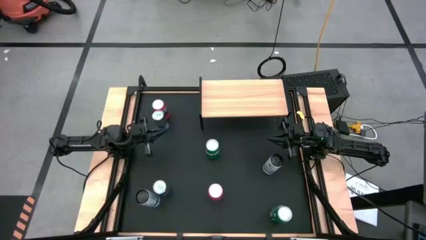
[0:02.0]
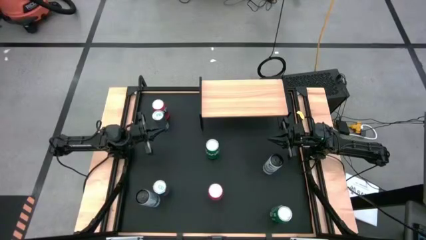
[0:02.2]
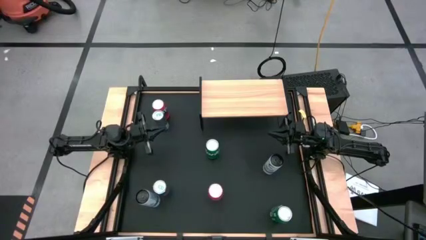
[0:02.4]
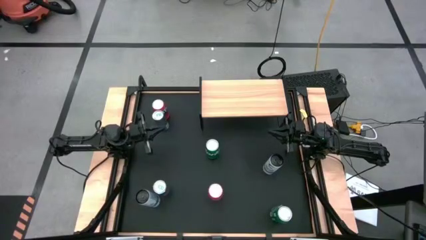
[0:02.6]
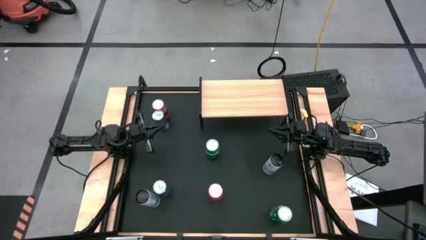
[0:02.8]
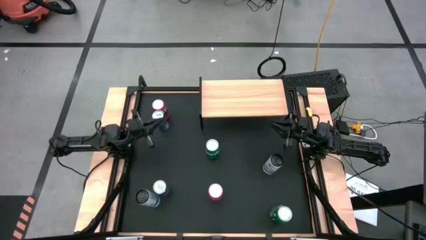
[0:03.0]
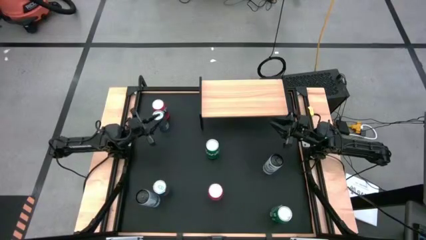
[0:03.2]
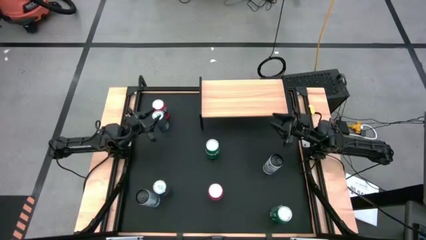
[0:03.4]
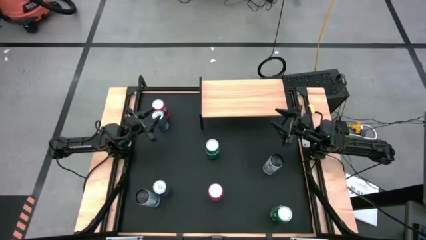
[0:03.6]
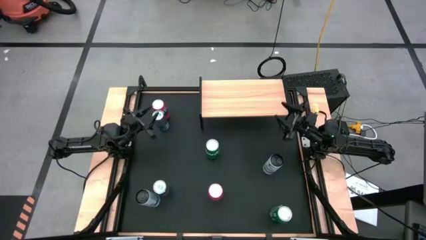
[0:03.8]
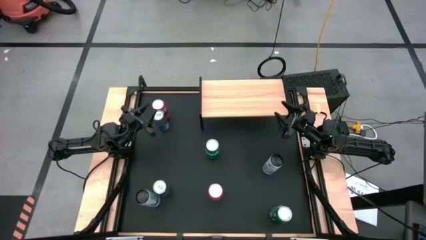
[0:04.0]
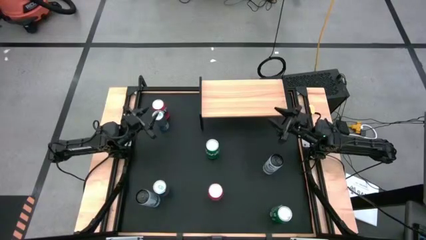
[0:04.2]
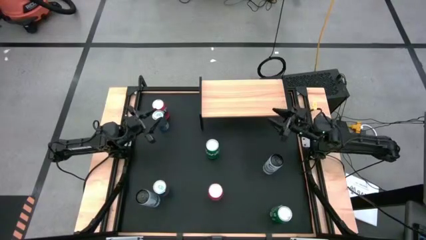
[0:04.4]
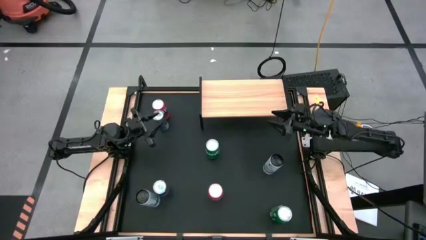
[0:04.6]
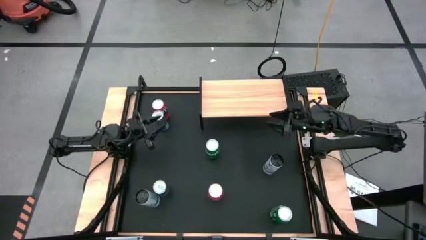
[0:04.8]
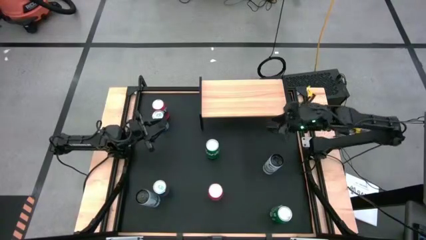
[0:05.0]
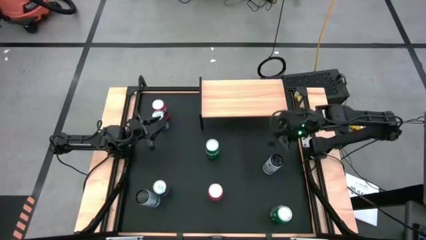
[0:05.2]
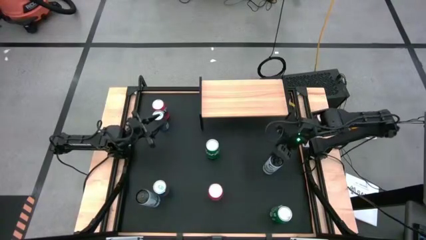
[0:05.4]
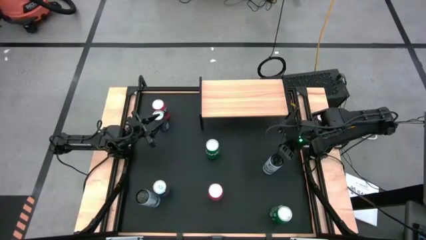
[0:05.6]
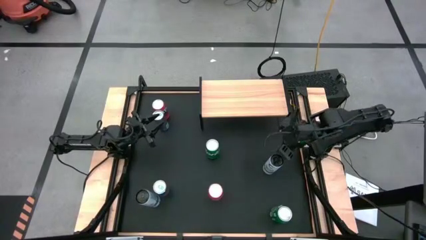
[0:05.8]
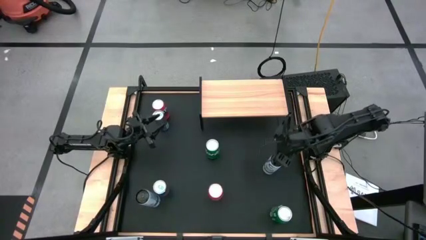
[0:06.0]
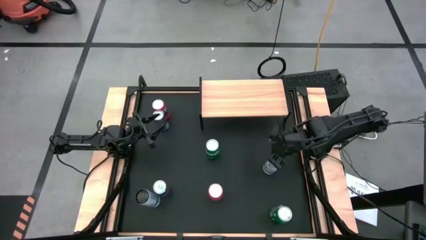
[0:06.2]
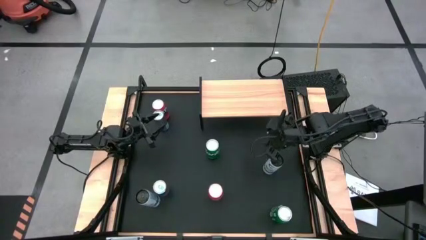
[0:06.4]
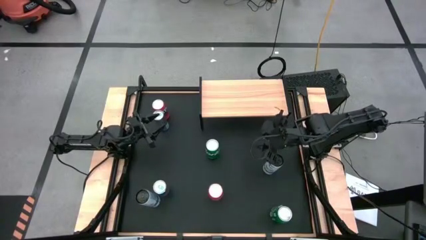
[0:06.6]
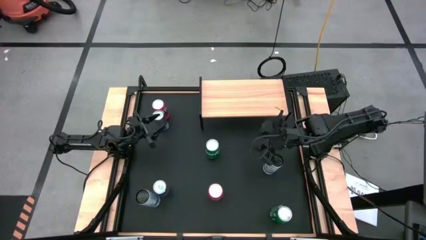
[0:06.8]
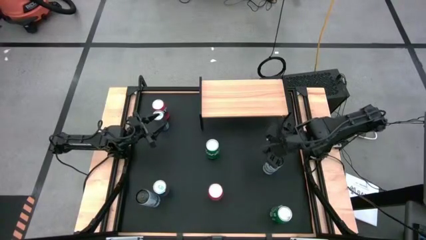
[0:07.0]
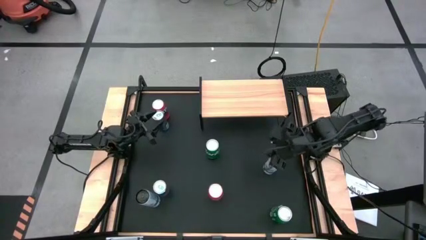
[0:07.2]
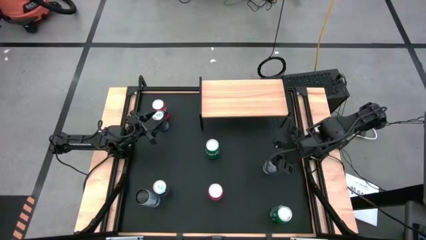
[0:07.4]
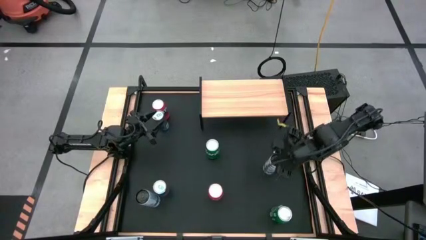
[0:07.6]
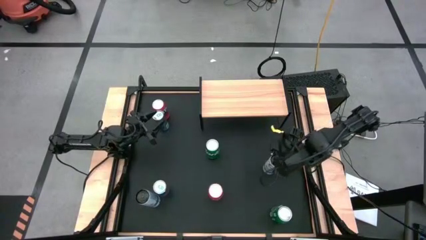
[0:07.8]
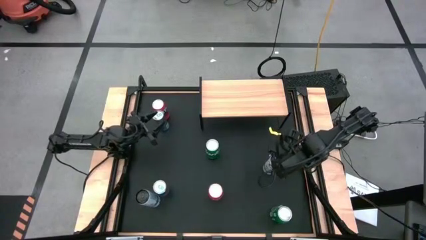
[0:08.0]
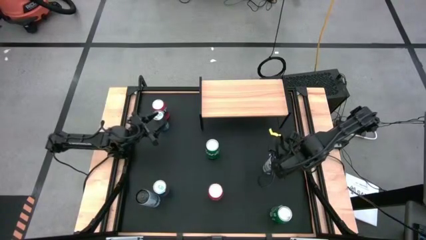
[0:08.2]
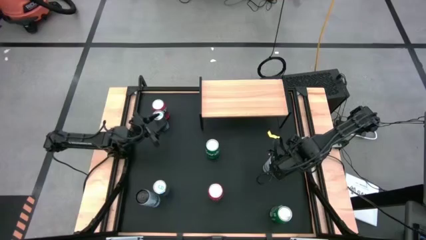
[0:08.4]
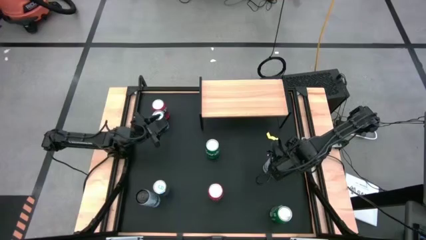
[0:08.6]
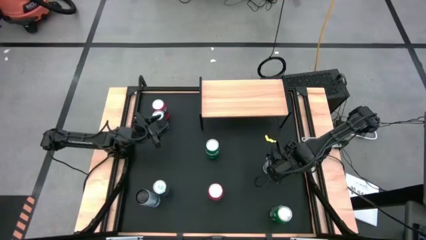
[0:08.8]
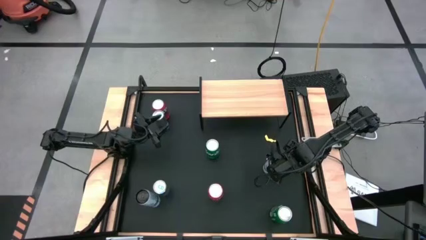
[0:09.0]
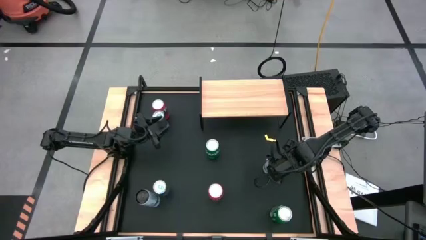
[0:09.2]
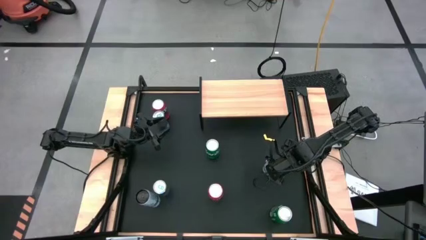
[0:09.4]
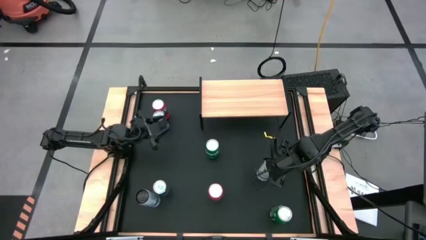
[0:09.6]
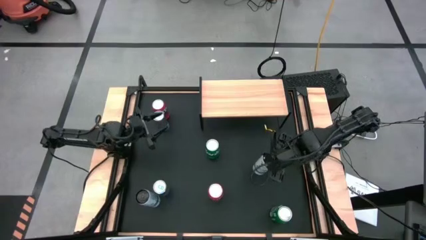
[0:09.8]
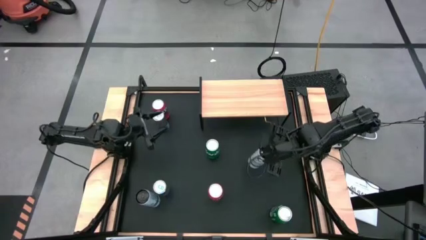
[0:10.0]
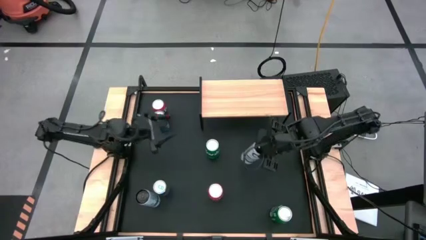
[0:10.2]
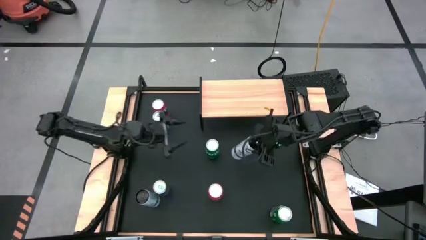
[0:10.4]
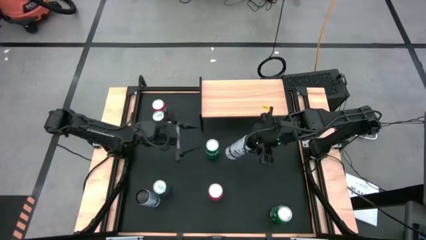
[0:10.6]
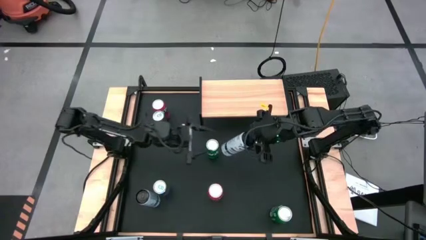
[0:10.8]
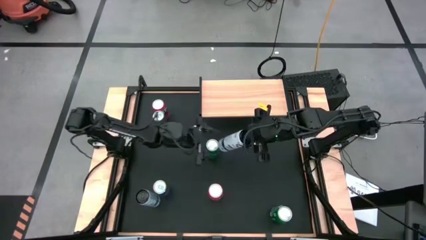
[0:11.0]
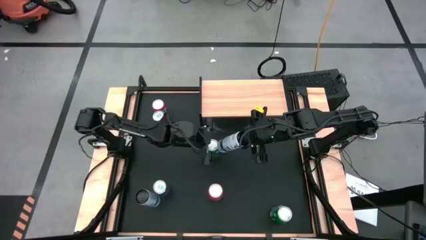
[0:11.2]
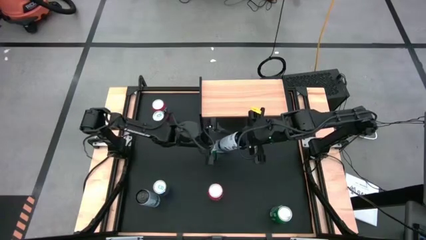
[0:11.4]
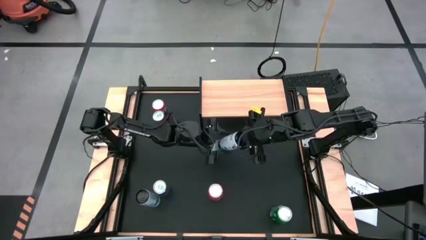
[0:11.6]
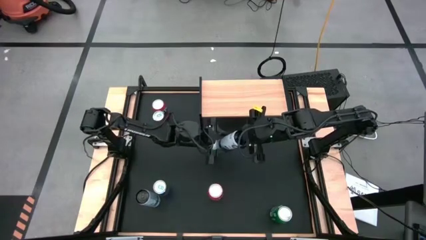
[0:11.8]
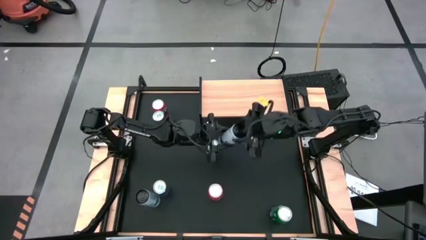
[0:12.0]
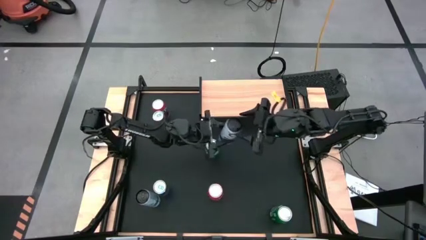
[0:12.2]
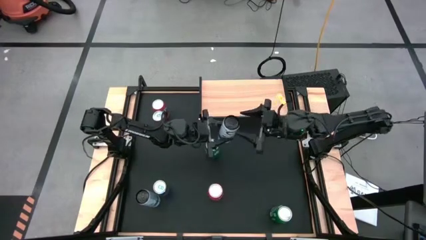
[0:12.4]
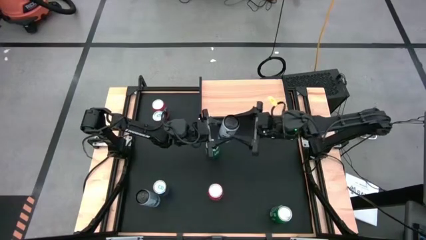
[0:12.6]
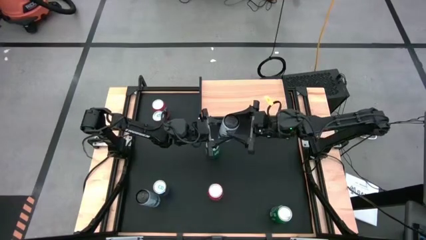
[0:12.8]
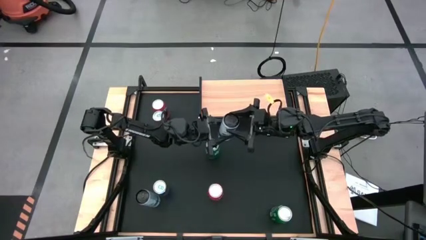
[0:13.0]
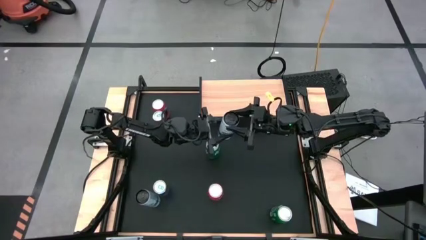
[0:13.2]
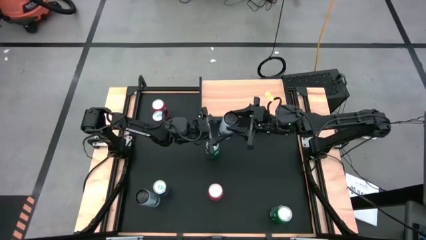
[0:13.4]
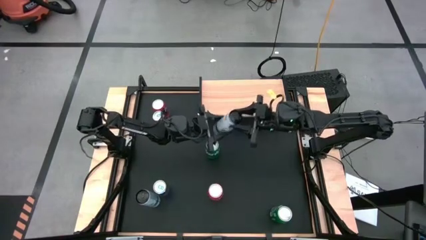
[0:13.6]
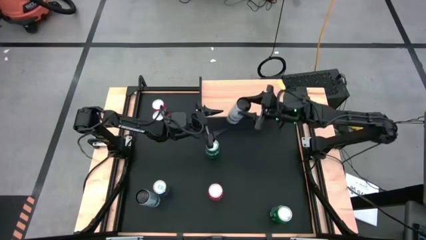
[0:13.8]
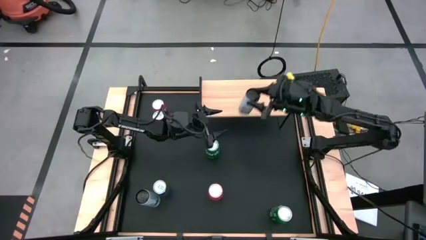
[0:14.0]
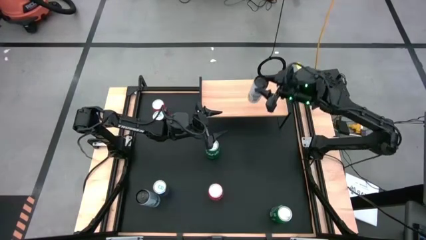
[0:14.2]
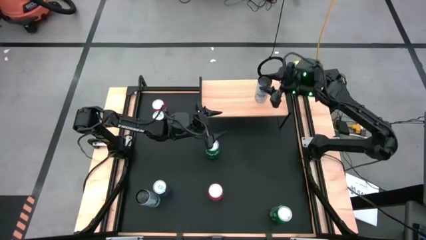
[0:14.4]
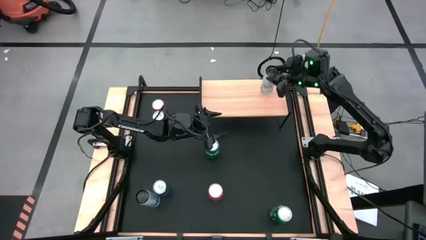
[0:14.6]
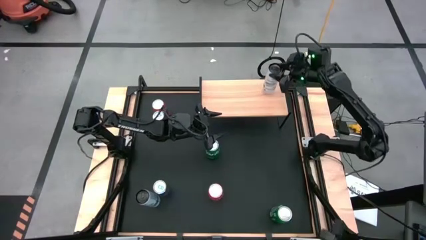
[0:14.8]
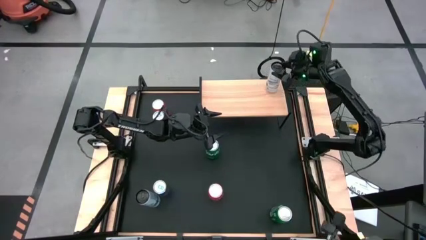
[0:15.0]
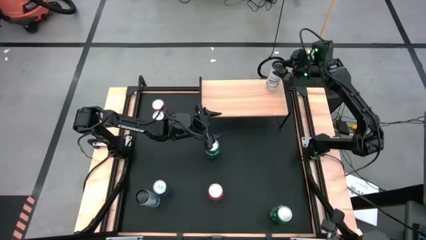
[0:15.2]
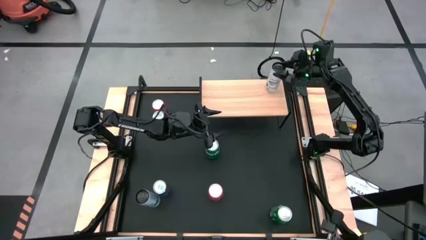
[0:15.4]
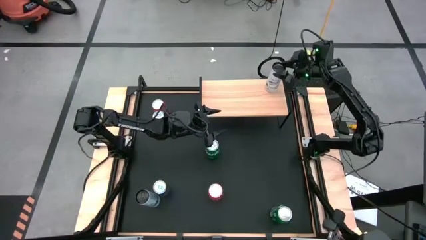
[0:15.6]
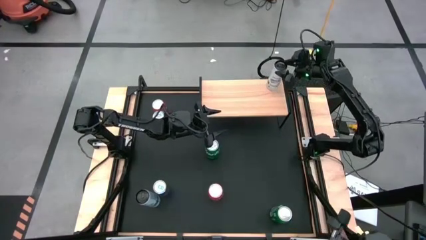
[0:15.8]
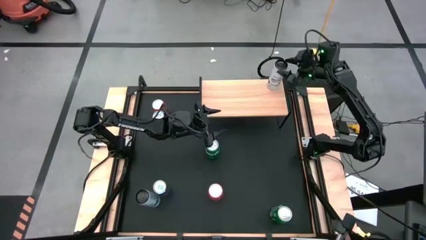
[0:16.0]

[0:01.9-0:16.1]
Task: Place canned beverage on shelf
Put the right white soda can on the shelf
